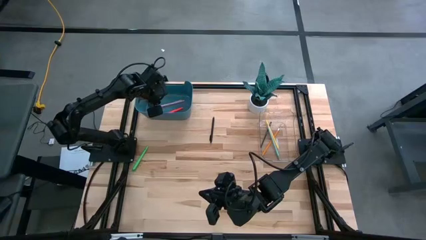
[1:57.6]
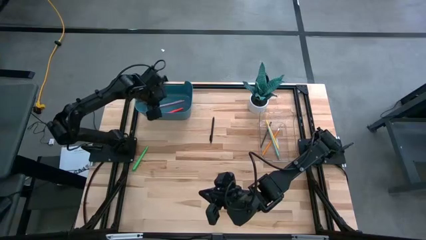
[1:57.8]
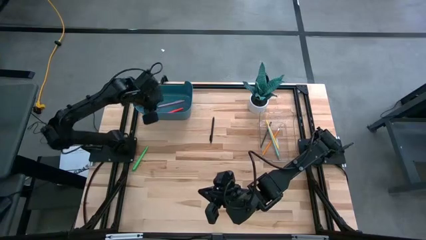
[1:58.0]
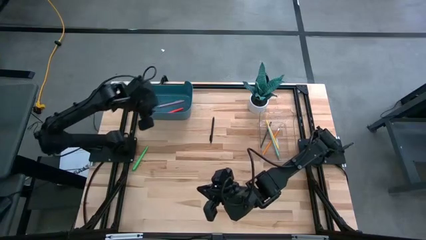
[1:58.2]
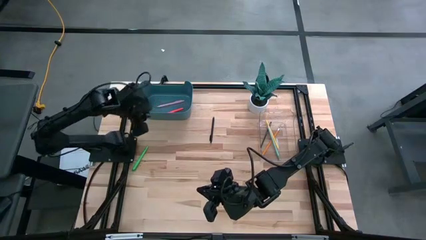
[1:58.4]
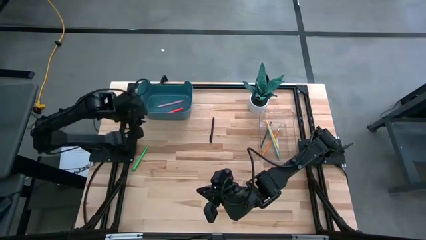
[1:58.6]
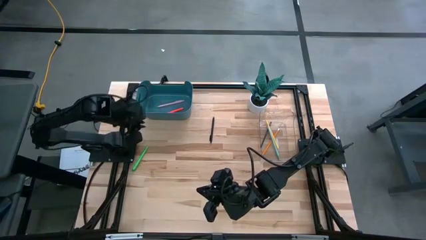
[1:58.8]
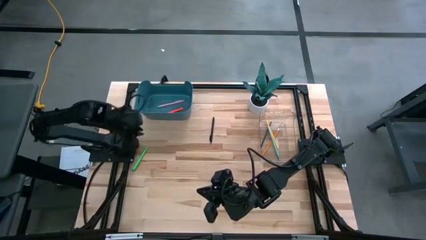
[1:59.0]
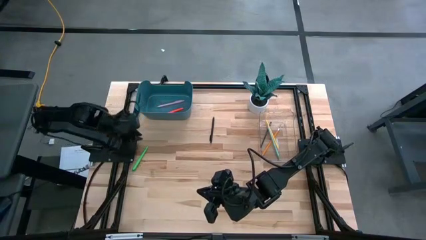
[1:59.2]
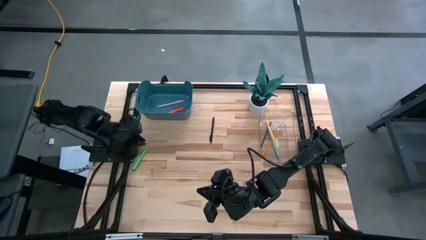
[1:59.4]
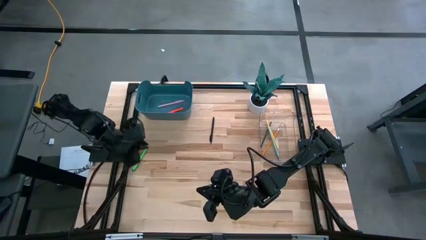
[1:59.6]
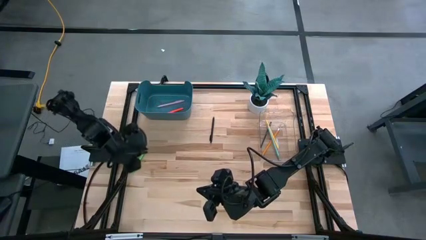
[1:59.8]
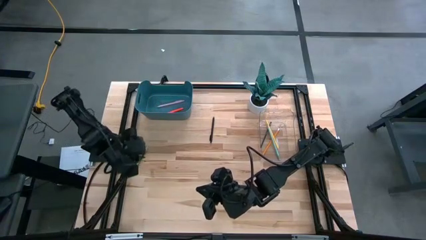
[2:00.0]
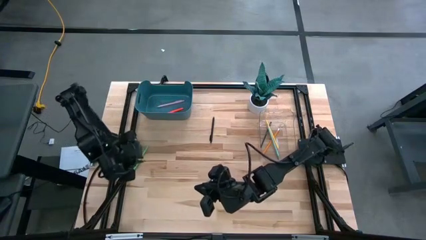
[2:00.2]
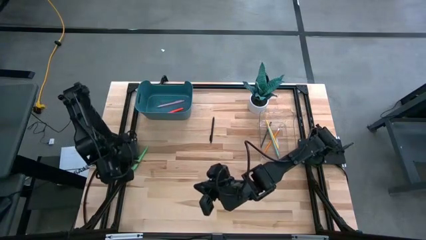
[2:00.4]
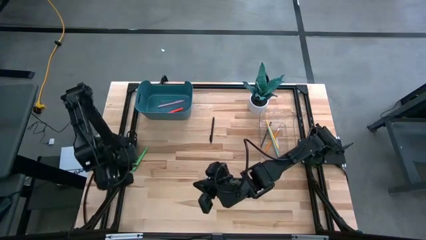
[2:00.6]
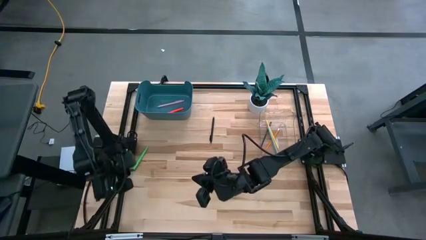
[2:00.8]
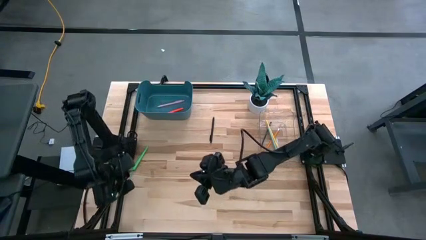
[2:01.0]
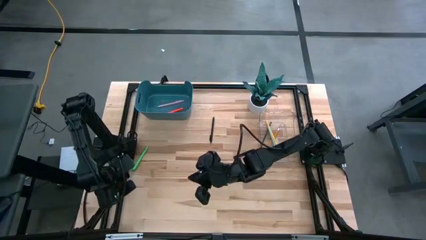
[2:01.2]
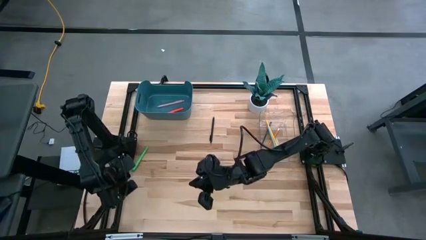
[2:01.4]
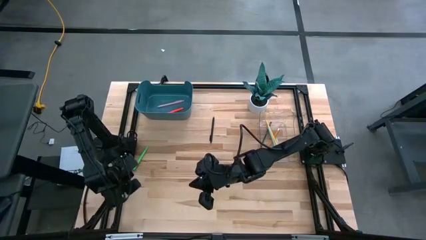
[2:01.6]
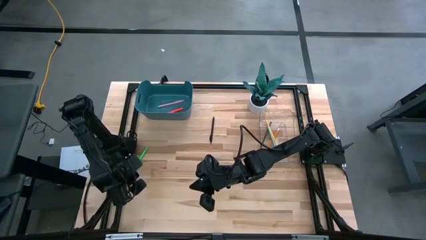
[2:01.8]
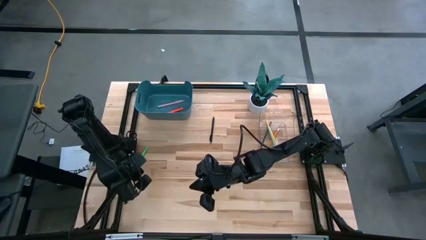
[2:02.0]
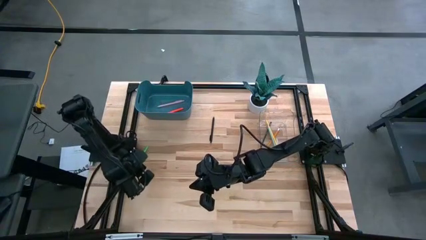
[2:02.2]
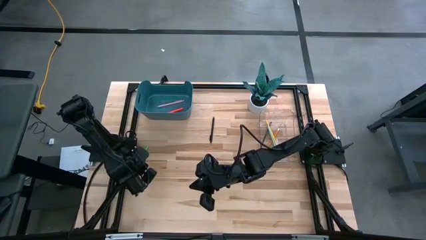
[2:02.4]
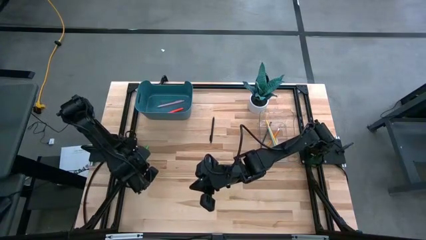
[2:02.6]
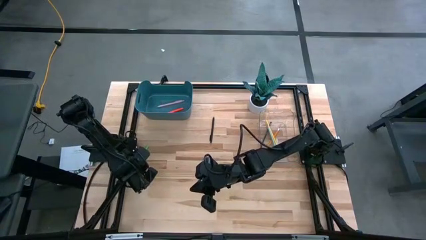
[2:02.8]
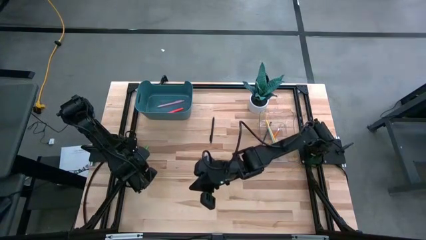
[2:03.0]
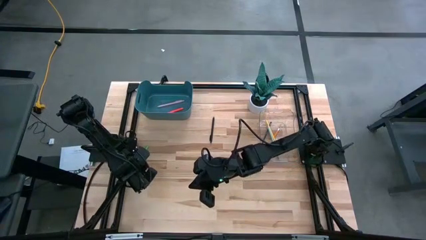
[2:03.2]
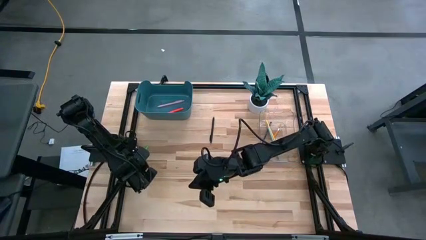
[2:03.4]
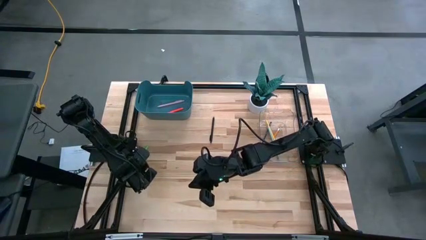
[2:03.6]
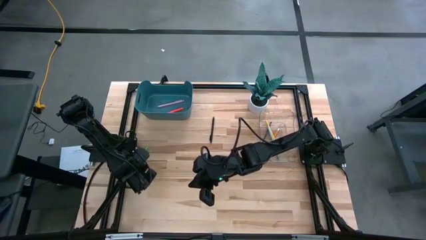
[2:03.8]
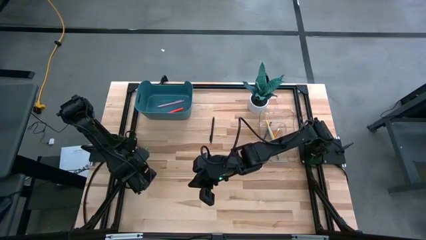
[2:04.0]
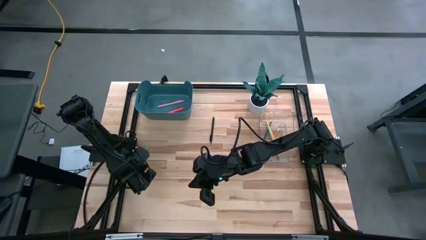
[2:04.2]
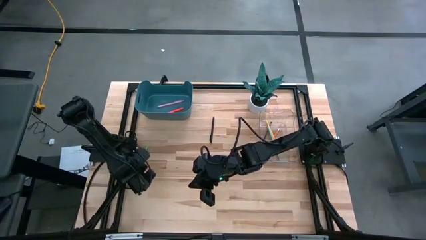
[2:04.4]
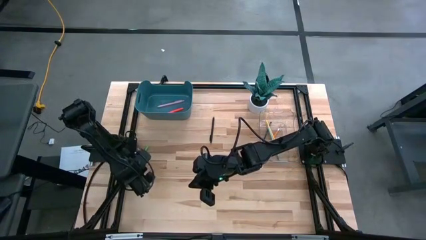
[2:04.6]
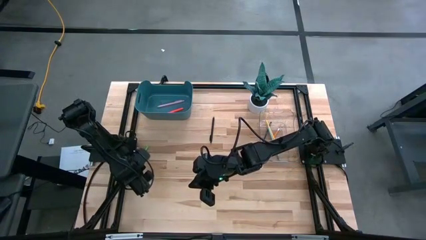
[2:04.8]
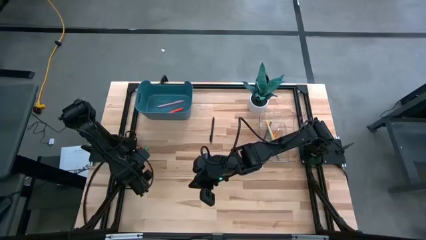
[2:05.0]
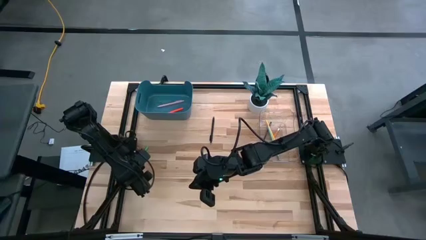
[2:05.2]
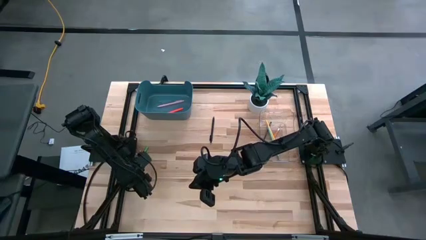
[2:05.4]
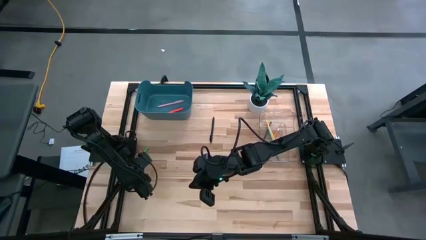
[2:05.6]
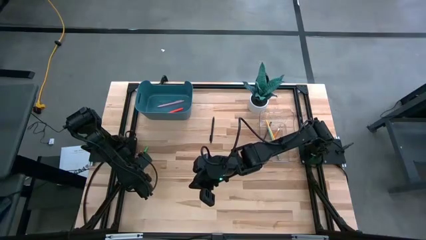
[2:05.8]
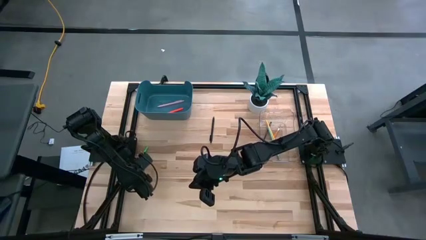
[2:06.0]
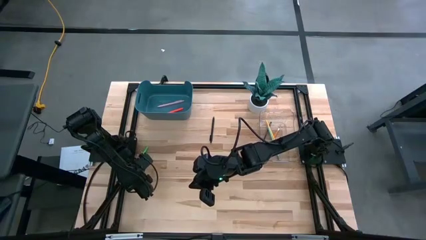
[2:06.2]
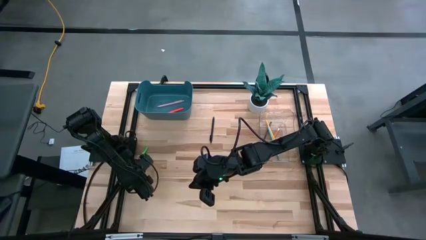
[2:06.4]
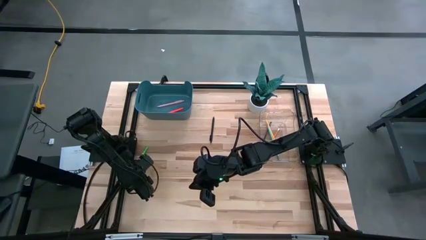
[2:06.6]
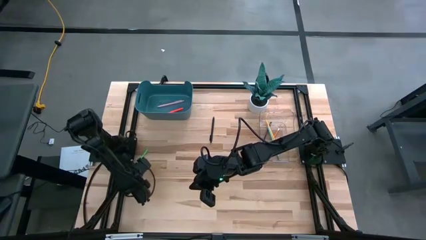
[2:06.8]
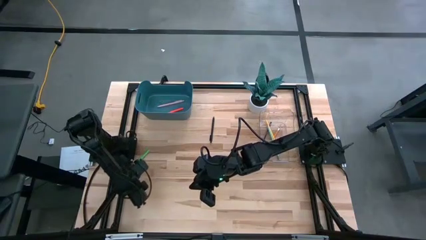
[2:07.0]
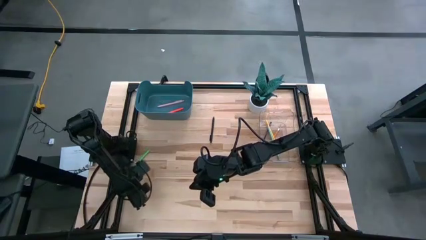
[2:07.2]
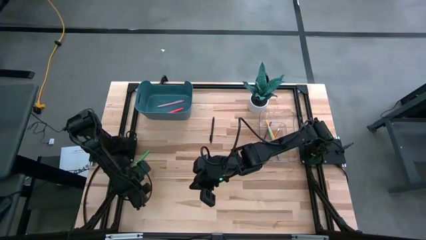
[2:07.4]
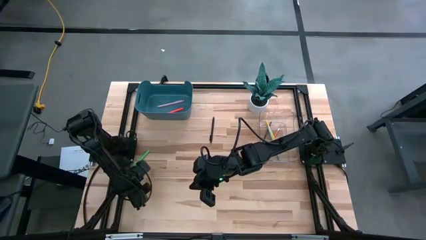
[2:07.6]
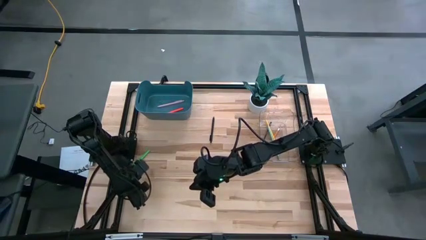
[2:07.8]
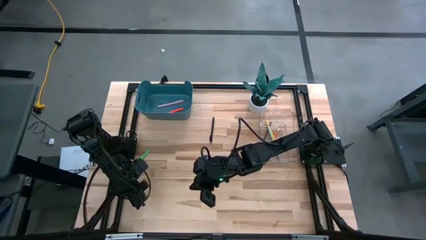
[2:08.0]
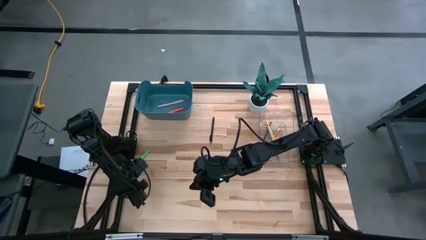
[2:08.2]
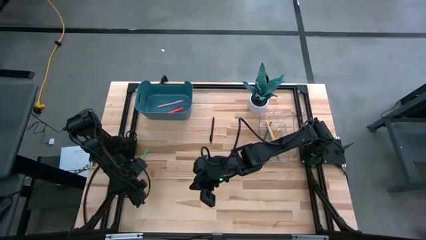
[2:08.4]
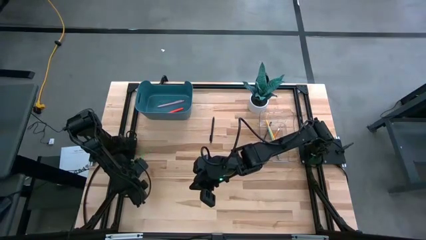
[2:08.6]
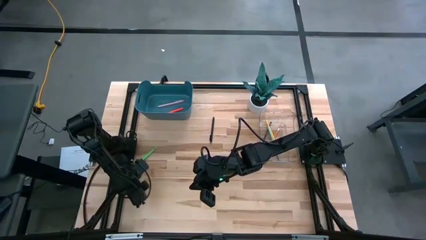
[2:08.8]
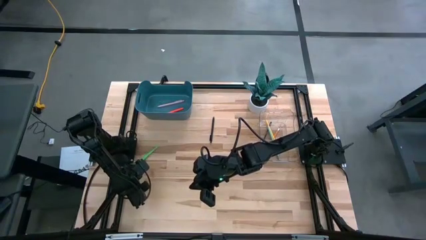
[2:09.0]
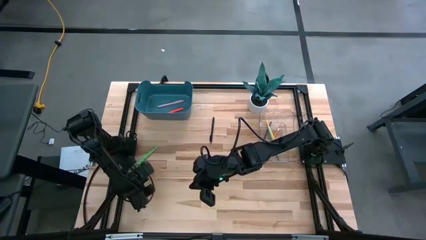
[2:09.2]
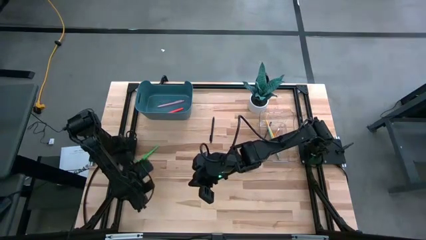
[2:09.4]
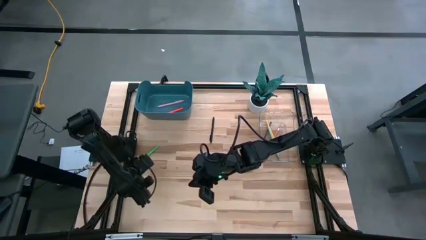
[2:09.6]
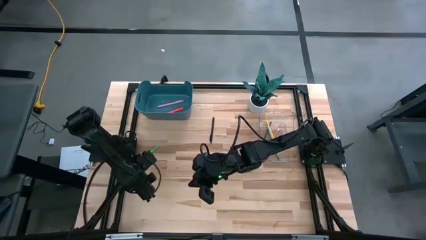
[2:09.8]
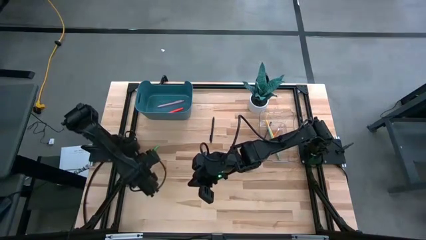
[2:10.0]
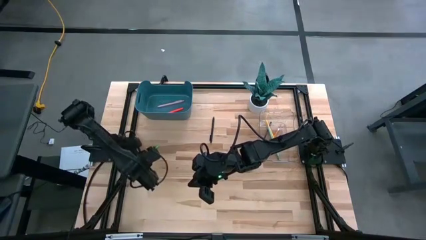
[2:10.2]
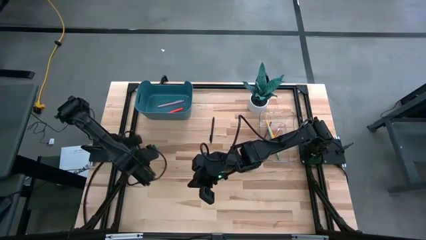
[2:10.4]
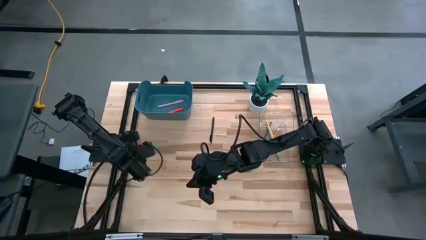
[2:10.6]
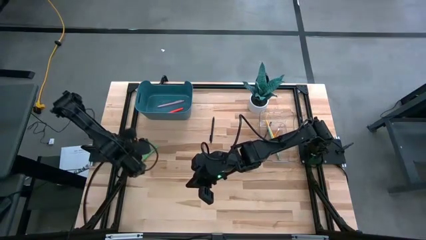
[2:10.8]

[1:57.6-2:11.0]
Task: Sort pens & pencils
Put the green pen into the blue bin

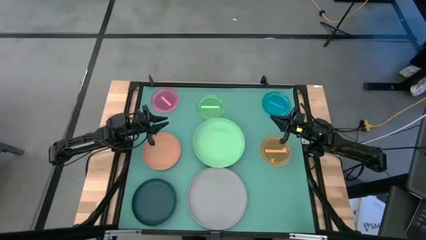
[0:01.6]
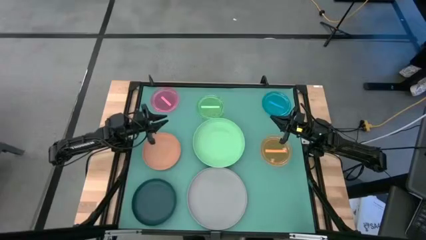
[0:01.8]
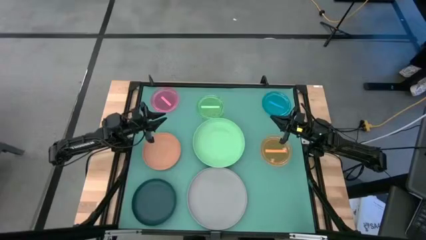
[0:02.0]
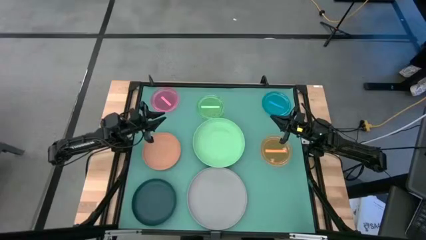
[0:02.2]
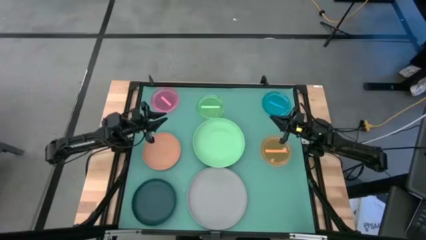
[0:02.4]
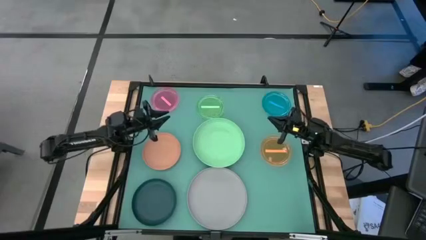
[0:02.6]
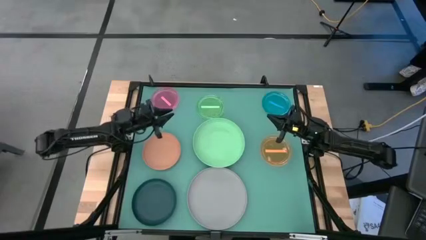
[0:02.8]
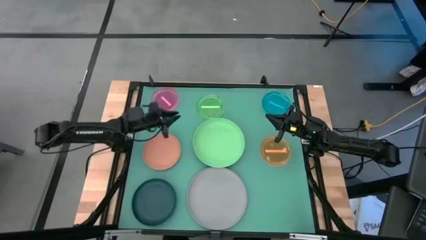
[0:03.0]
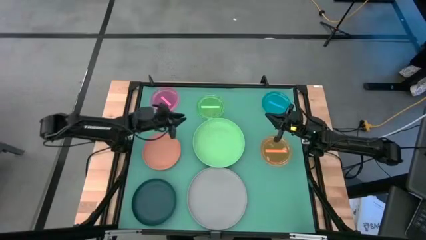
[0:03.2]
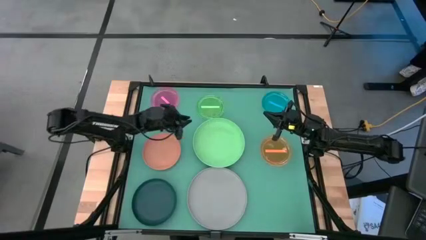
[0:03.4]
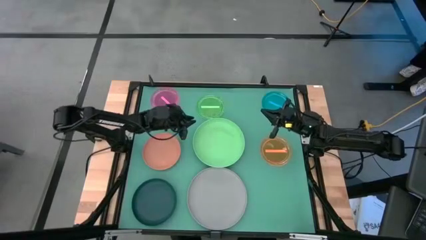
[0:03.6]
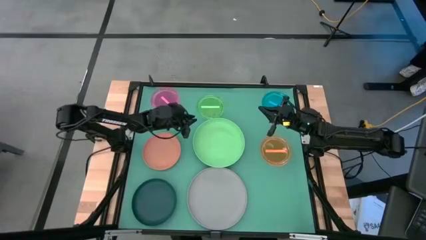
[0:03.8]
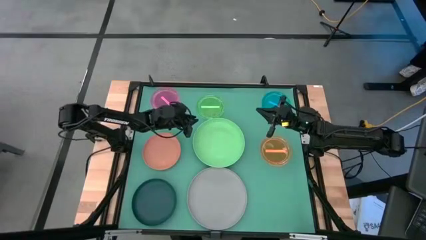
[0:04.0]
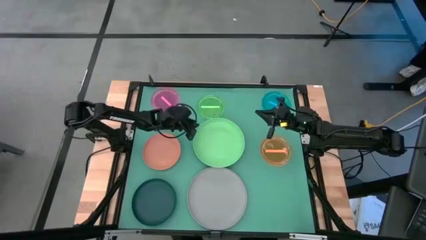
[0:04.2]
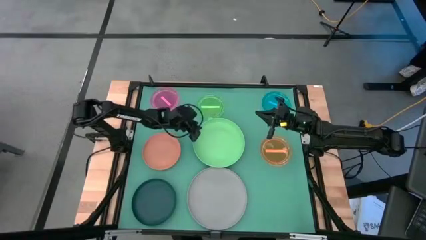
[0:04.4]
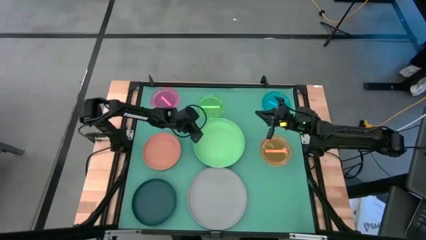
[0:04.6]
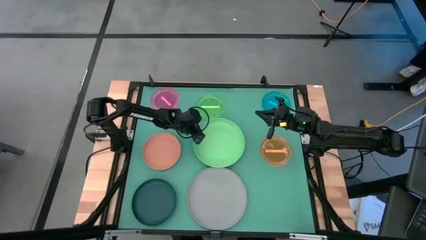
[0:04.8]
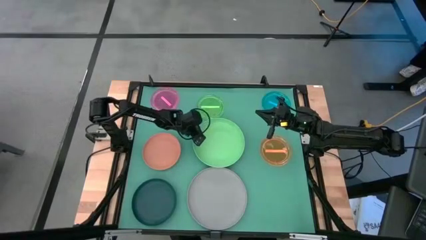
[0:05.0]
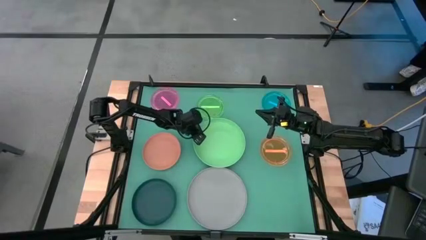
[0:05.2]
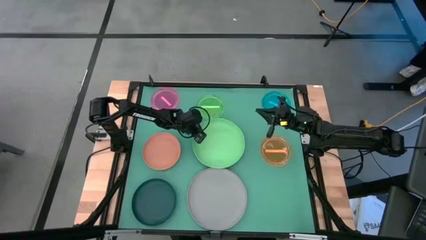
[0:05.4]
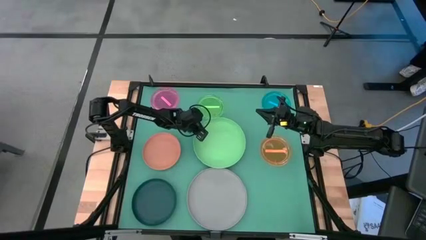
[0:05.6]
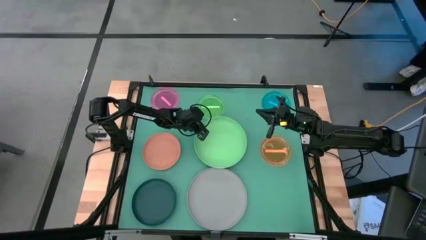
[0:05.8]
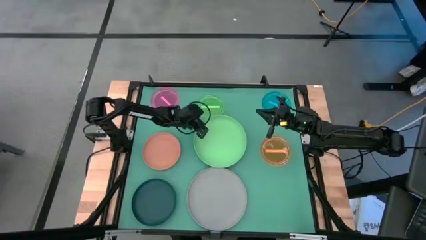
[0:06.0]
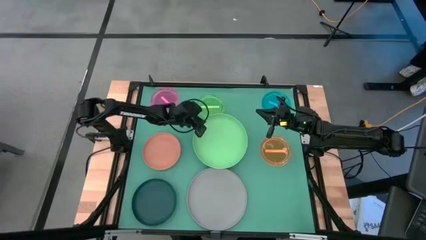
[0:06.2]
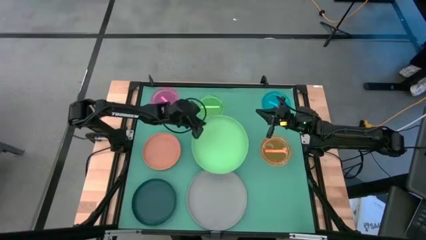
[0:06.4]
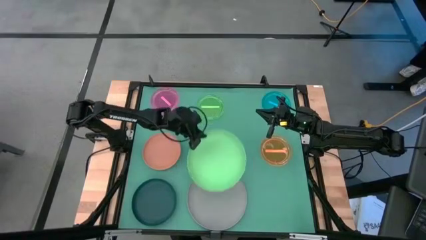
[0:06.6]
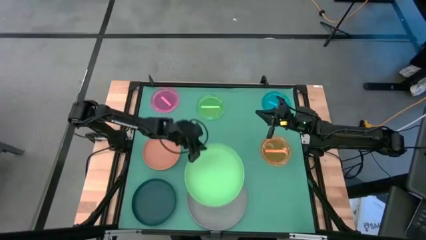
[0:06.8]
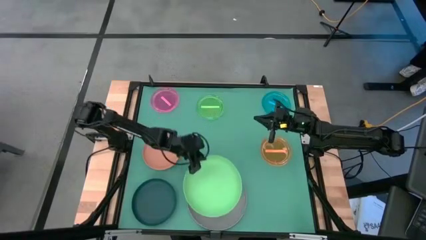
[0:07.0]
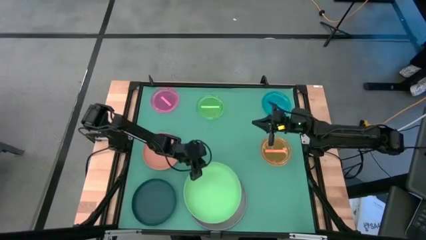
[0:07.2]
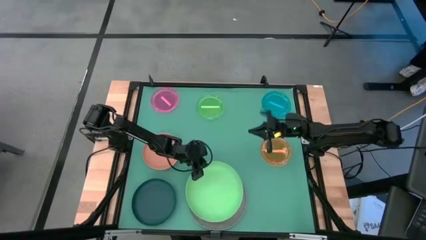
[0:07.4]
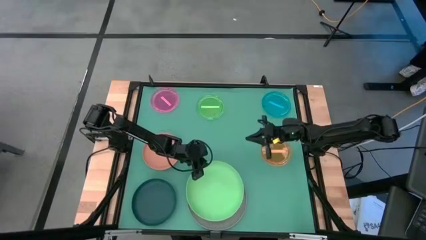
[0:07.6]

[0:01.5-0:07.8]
Task: Stack plastic plates
Stack the light green plate on top of the gray plate
